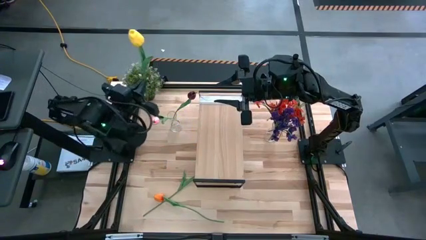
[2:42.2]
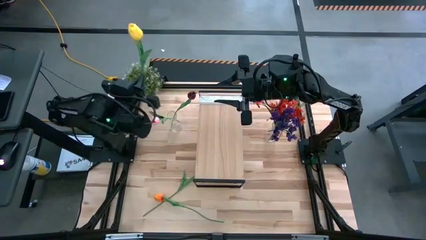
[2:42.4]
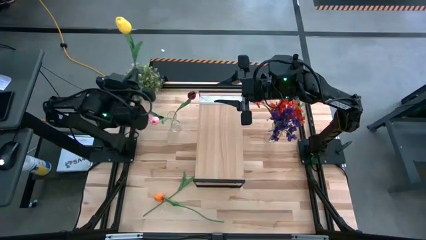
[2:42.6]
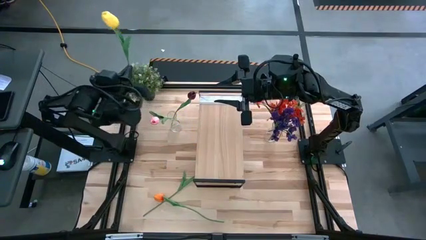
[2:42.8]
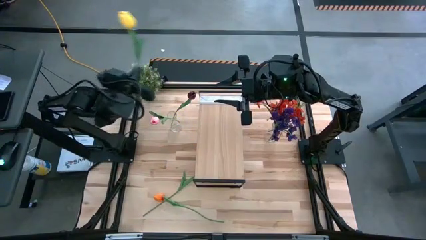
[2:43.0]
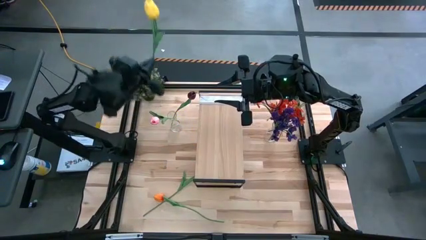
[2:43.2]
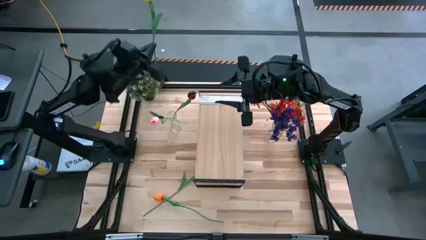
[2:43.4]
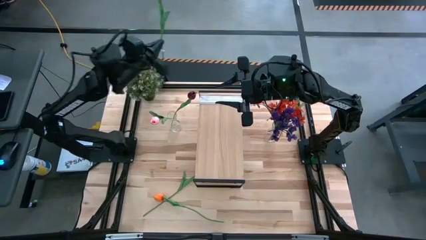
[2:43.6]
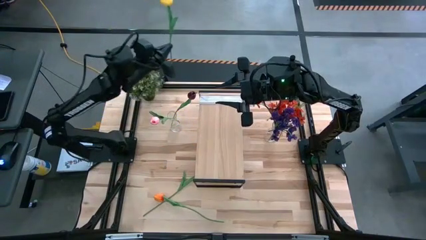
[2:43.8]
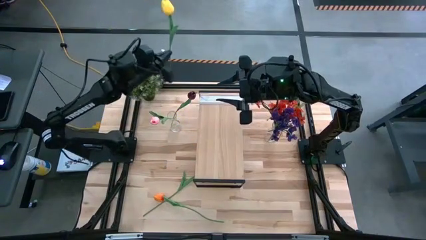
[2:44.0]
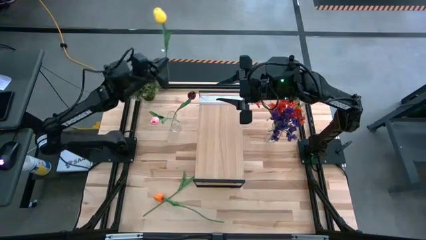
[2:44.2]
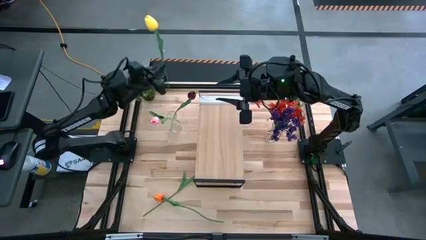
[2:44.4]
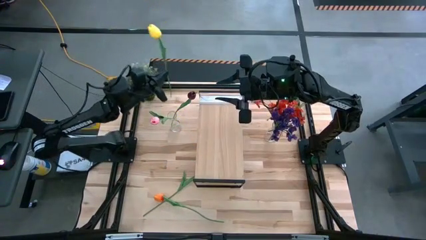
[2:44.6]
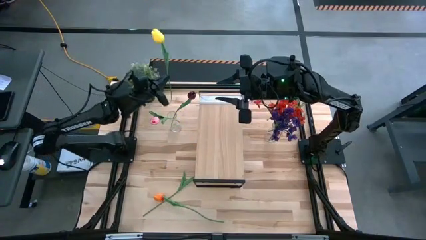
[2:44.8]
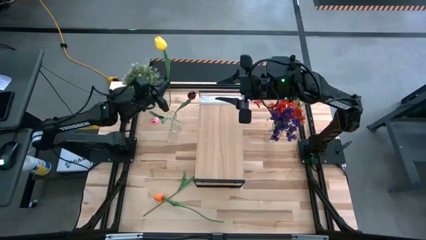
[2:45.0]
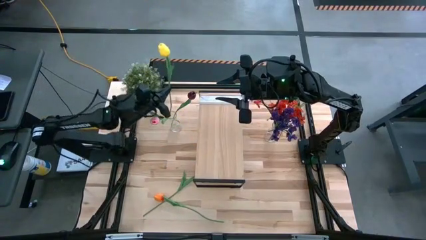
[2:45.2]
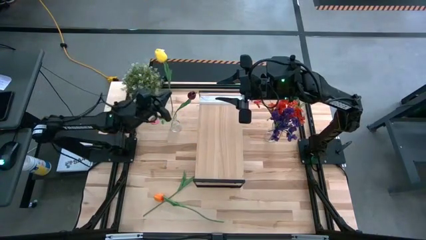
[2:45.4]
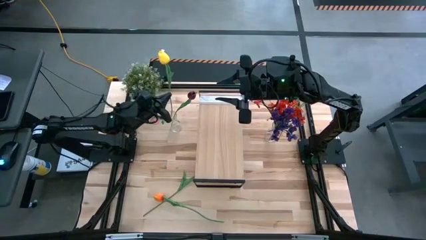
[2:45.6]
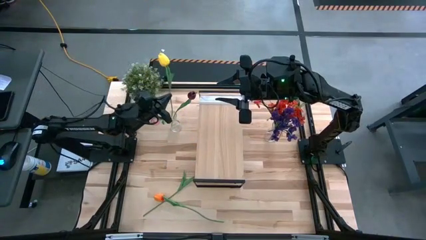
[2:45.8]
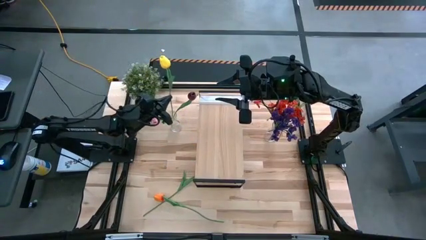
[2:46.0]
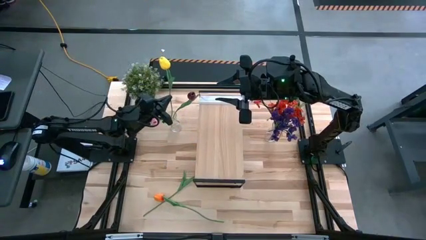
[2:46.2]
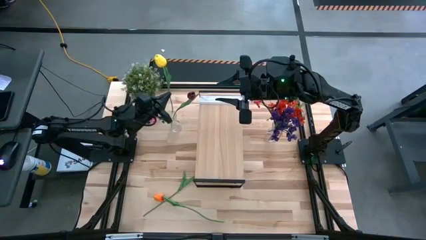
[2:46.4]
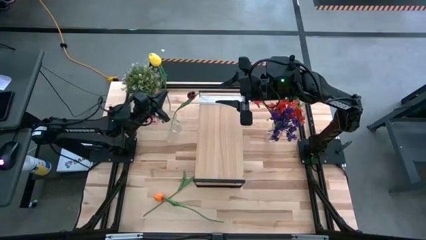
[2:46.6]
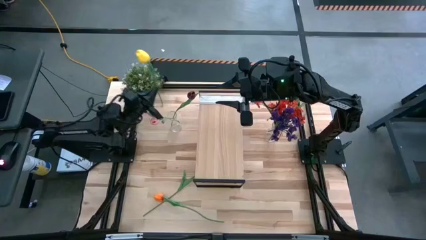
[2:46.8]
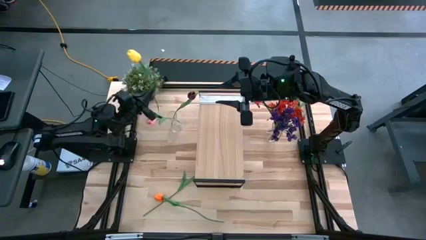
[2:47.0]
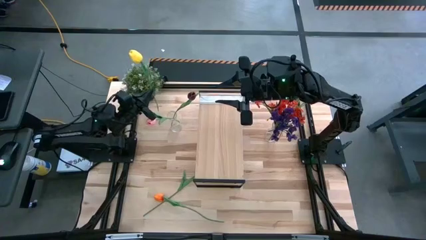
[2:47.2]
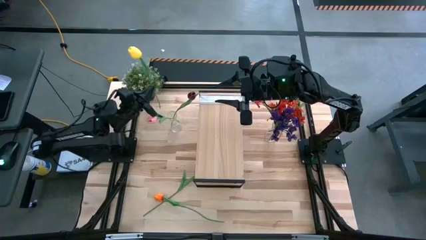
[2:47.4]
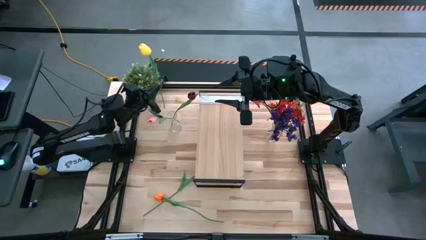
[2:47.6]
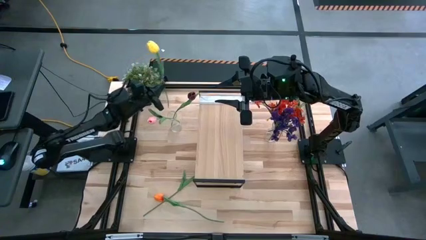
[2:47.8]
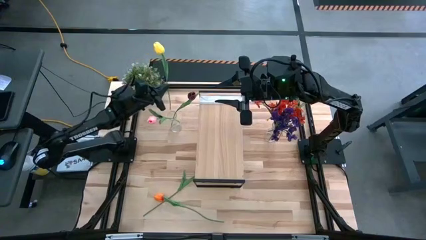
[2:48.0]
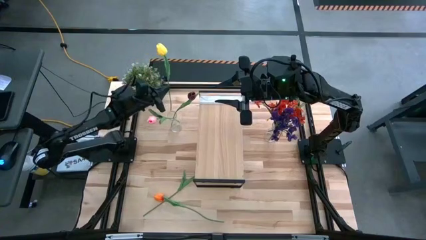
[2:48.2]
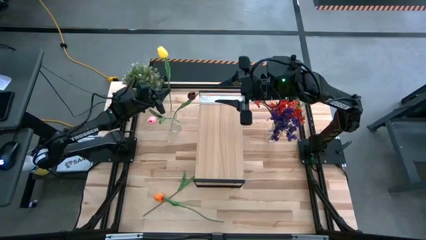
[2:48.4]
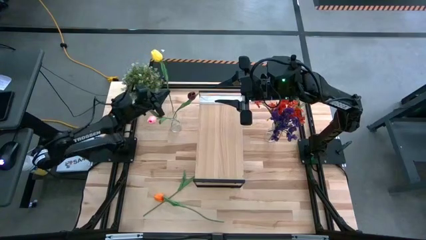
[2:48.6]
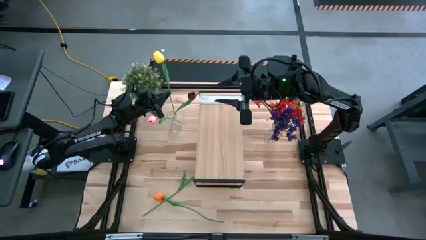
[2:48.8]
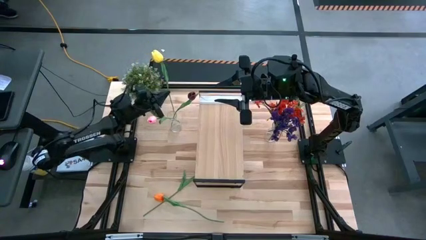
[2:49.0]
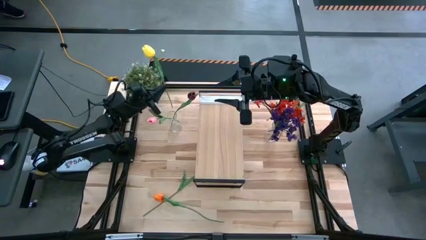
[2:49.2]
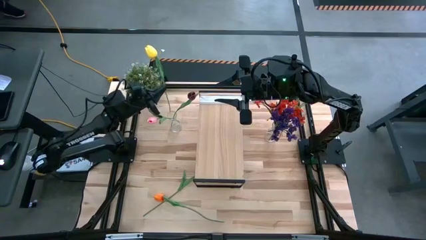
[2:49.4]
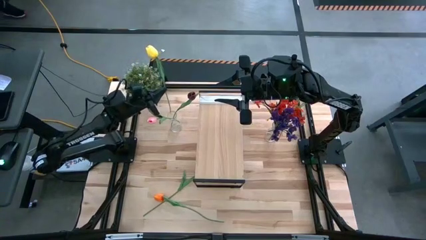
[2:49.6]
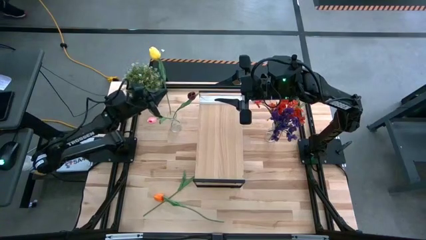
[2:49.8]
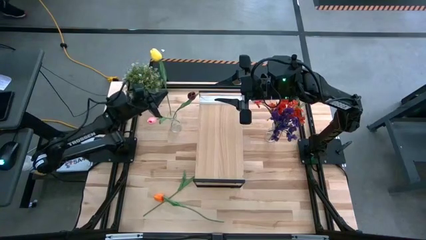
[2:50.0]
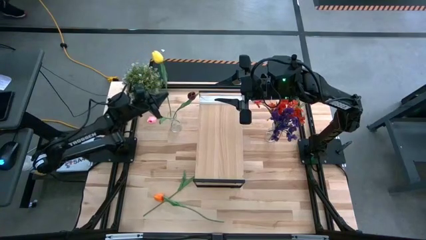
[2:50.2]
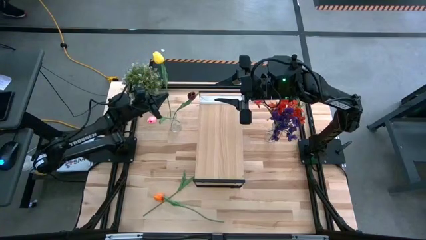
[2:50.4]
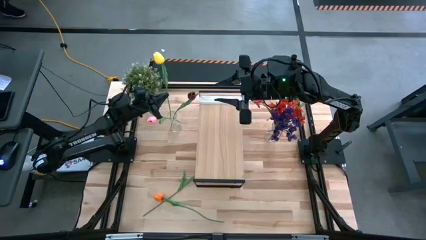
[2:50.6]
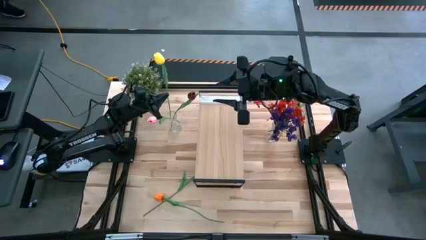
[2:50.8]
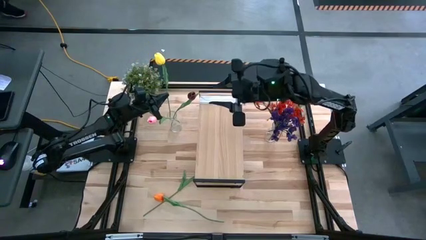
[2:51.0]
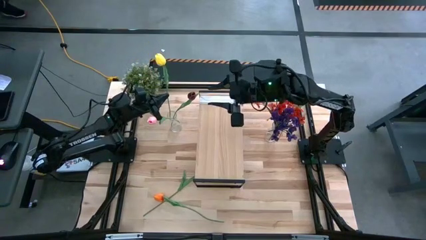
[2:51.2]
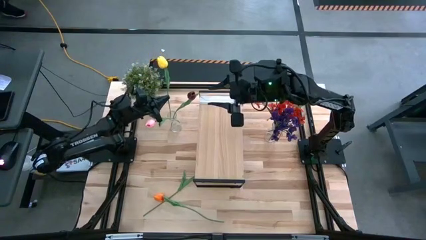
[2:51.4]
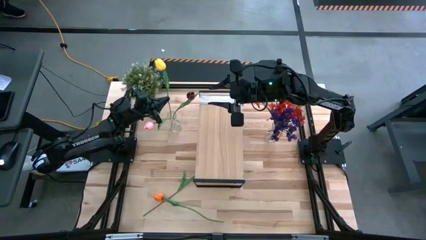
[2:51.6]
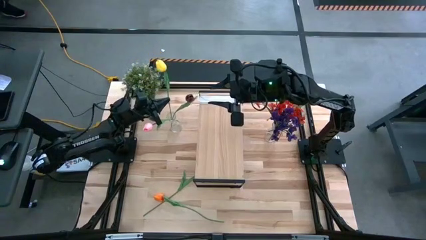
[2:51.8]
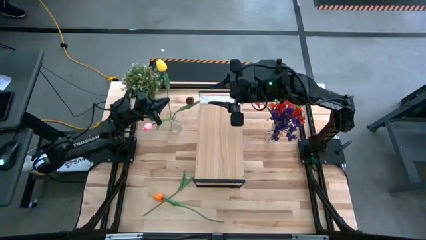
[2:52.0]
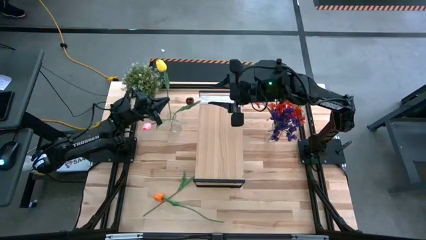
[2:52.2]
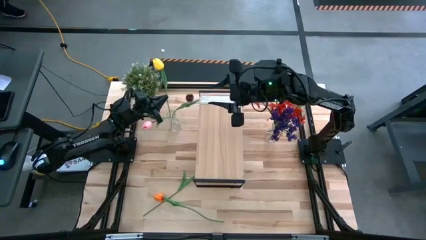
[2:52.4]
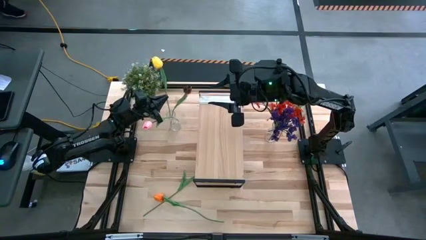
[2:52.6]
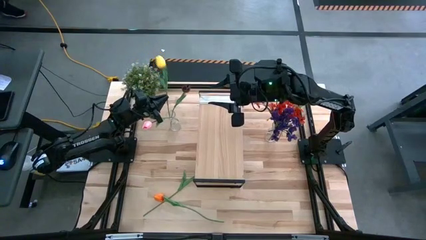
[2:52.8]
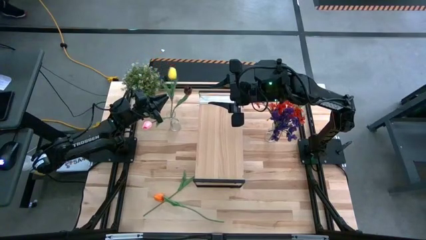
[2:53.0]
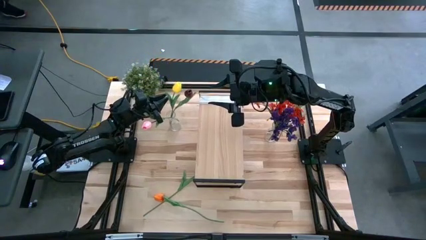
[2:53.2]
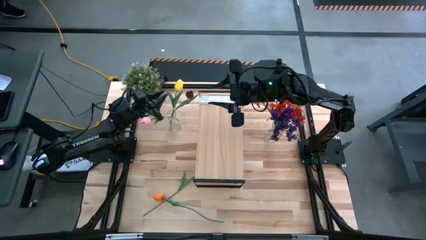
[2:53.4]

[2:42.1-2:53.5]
Task: Pick and place flowers into a vace then onto a shelf
Put the yellow tulip into the left transparent vase

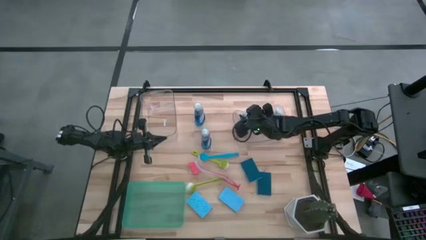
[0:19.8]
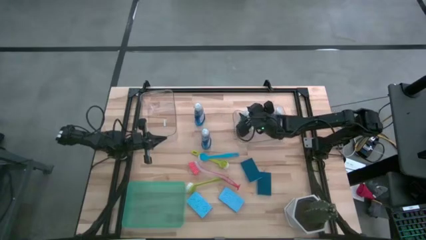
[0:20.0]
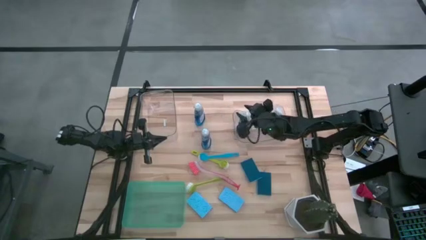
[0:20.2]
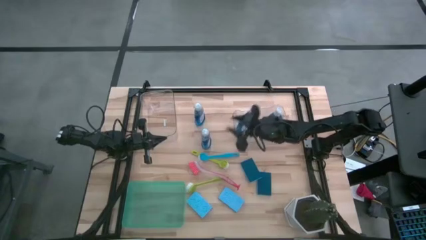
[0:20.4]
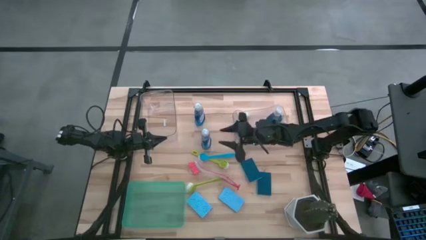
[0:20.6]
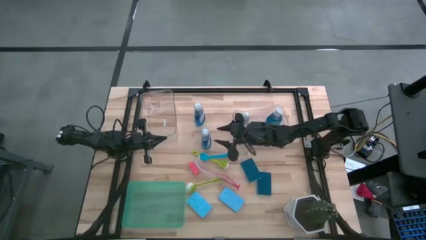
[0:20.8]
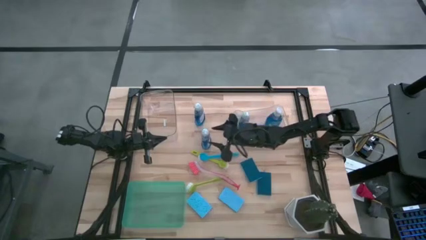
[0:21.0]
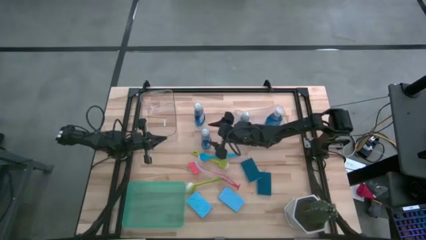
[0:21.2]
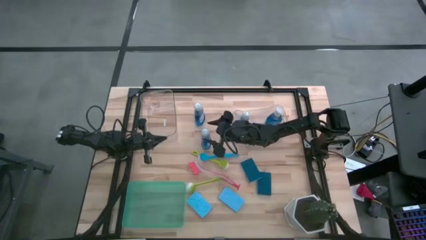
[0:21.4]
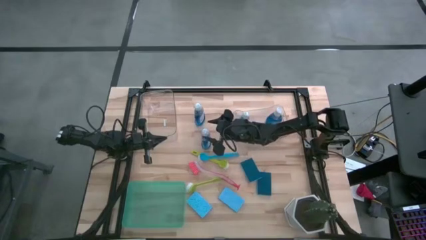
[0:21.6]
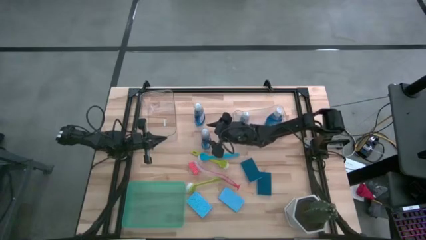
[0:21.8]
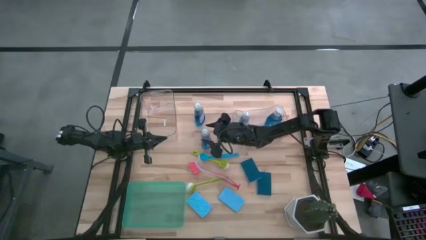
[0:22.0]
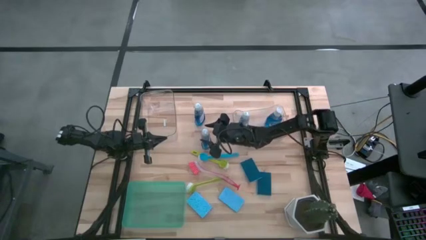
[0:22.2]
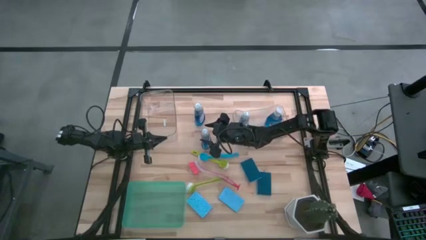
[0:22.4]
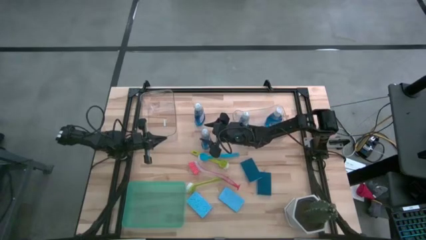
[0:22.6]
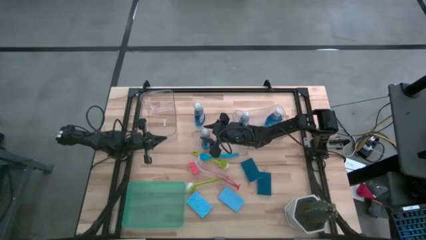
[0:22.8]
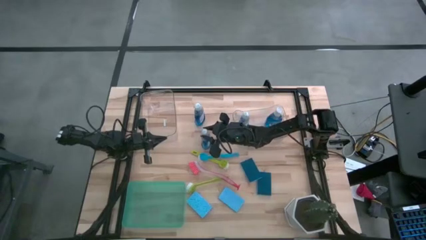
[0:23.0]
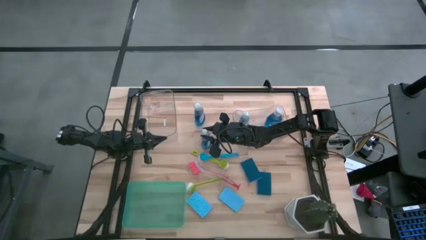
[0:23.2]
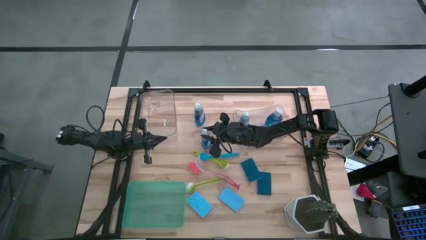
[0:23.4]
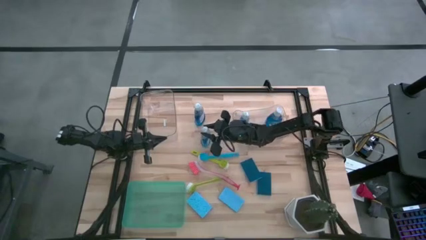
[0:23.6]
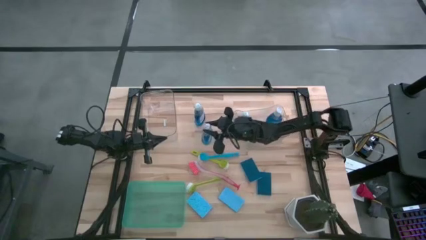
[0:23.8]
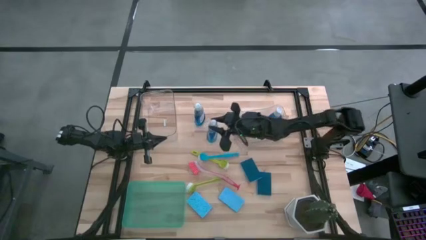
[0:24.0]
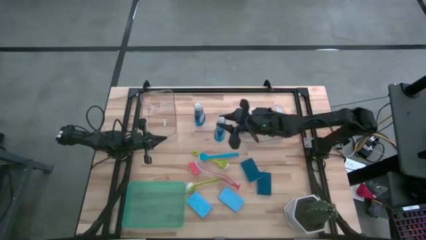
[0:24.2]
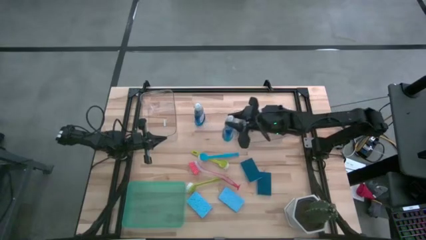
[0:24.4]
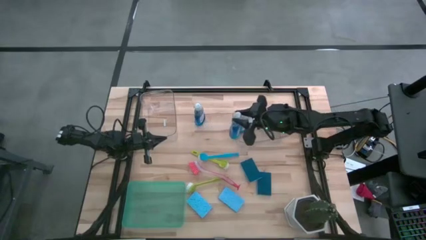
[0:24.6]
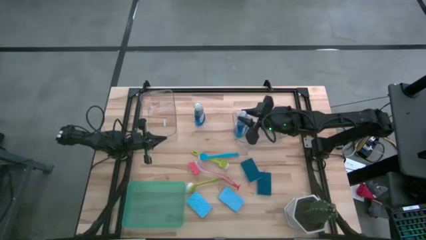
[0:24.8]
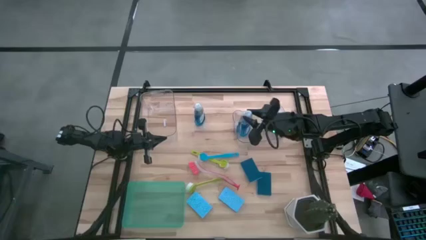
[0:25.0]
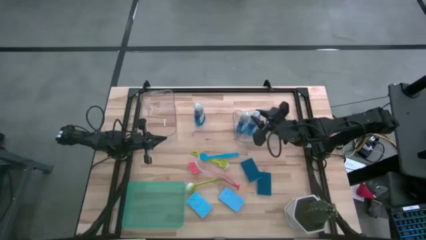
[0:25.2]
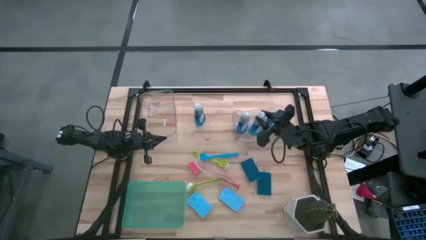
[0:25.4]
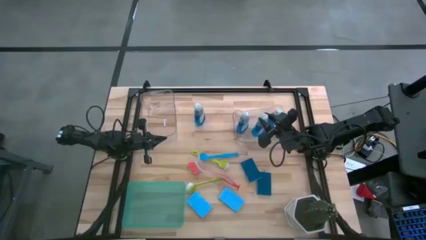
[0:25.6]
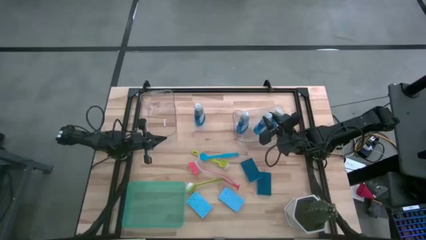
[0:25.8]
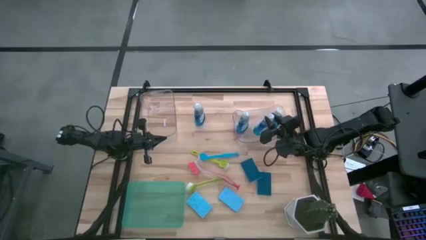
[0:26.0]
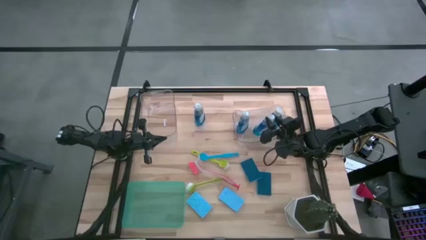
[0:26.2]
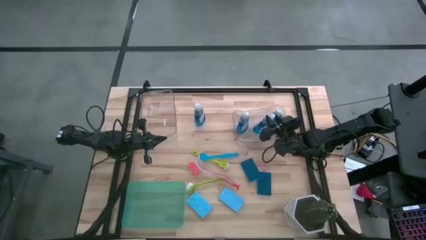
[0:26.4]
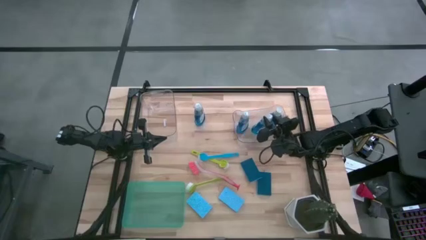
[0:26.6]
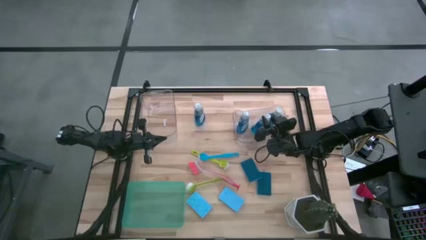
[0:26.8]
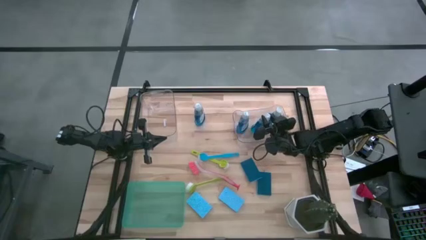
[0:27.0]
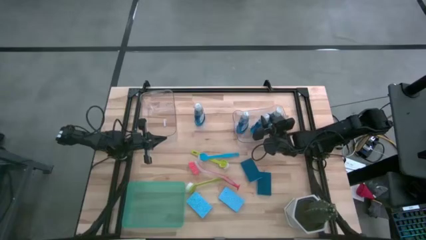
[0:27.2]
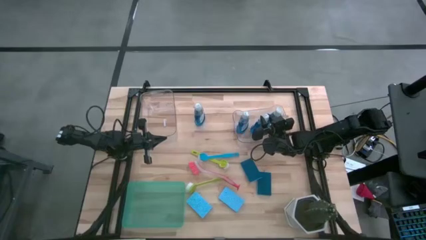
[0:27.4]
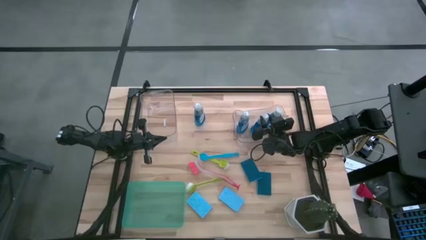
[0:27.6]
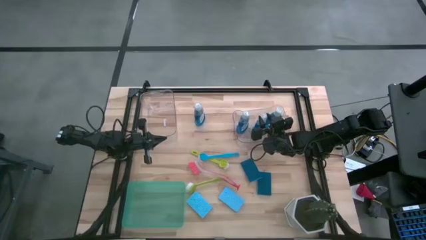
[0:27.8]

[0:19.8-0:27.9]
Task: Pick & Place Kitchen Sink Supplies
Put the soap dispenser into the right transparent bin
